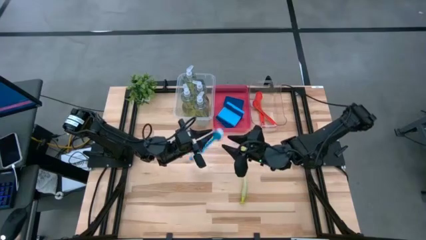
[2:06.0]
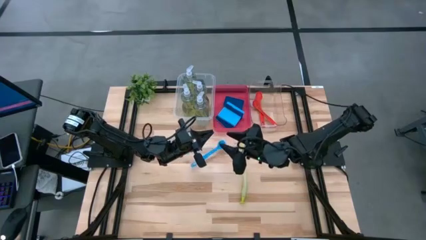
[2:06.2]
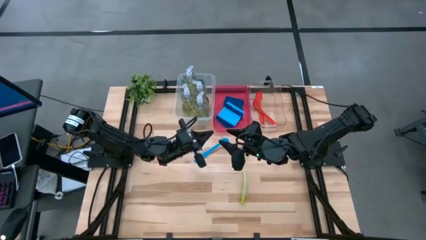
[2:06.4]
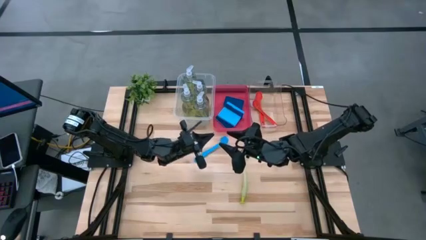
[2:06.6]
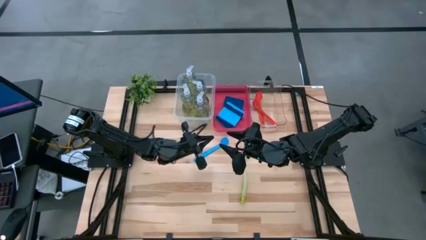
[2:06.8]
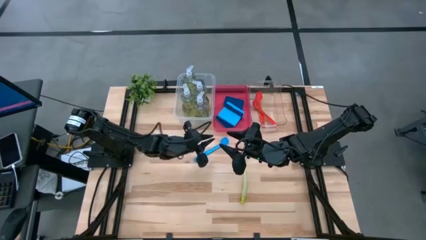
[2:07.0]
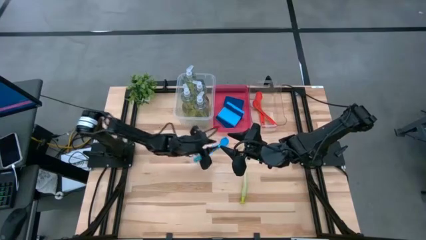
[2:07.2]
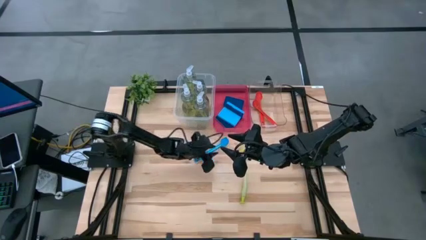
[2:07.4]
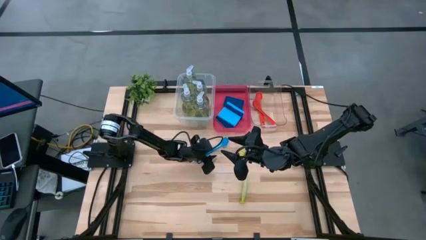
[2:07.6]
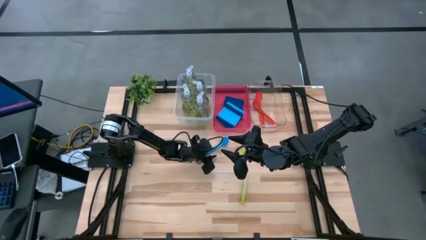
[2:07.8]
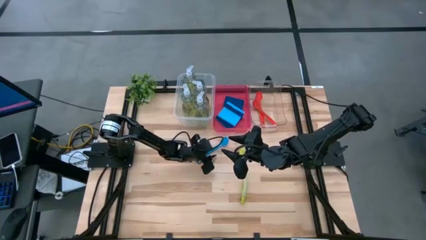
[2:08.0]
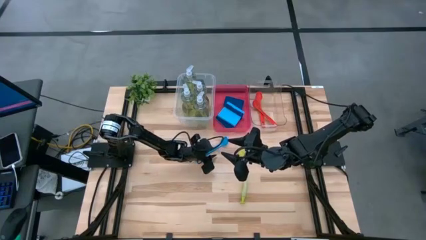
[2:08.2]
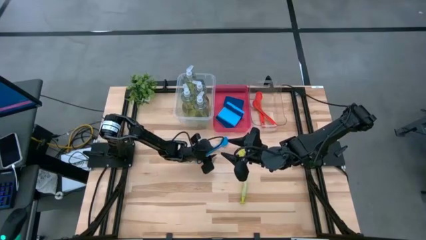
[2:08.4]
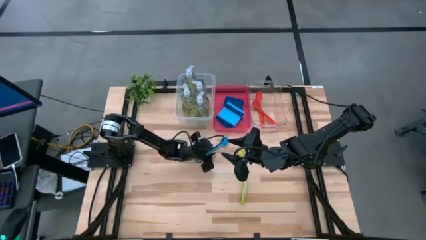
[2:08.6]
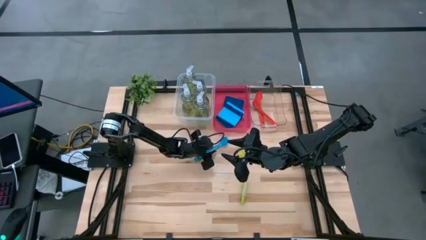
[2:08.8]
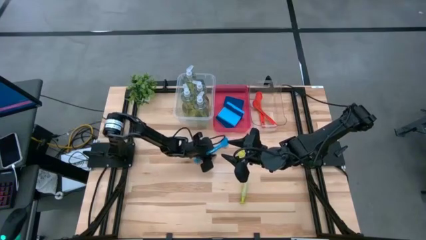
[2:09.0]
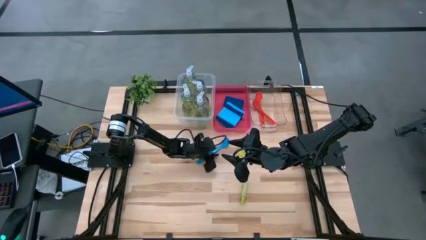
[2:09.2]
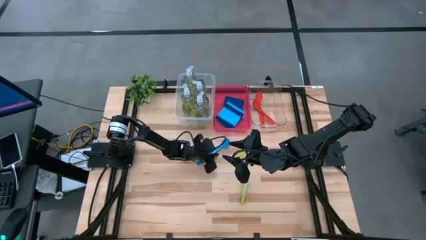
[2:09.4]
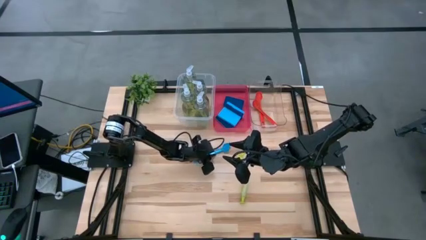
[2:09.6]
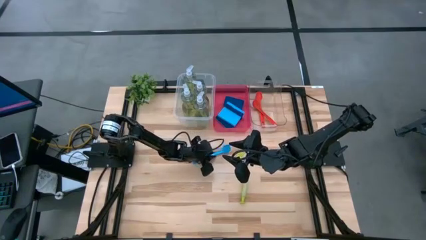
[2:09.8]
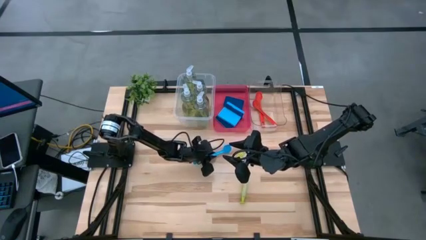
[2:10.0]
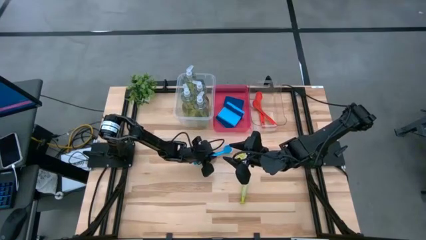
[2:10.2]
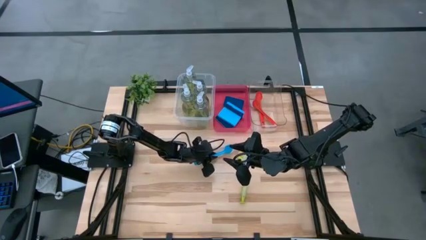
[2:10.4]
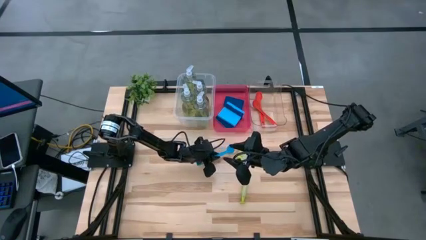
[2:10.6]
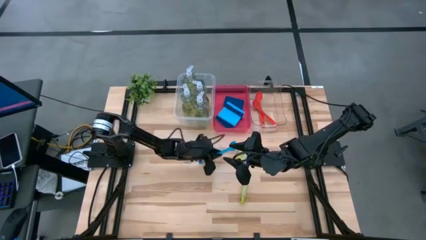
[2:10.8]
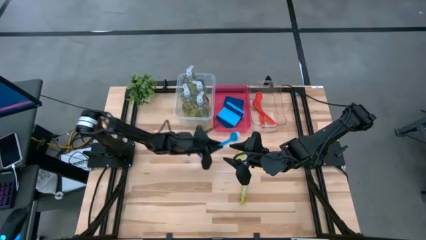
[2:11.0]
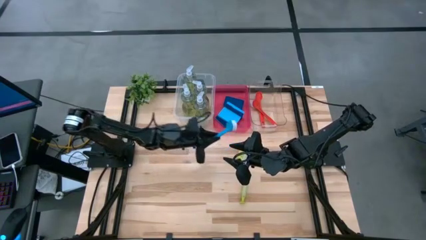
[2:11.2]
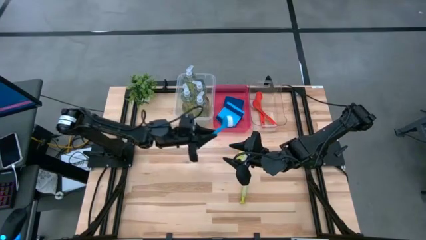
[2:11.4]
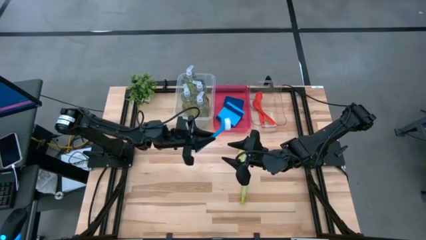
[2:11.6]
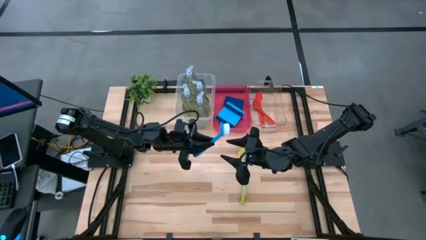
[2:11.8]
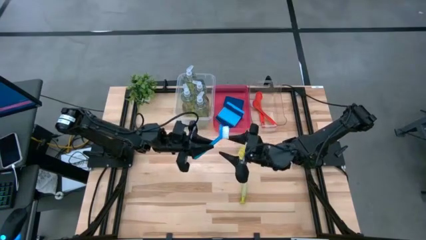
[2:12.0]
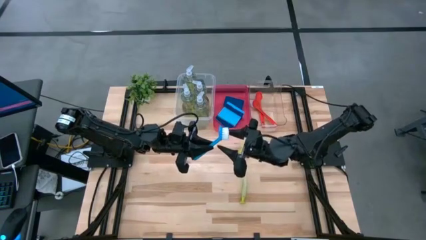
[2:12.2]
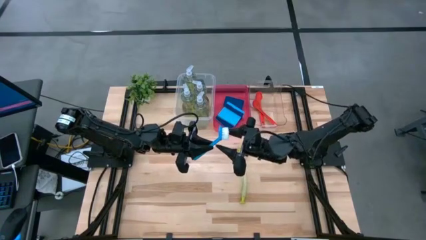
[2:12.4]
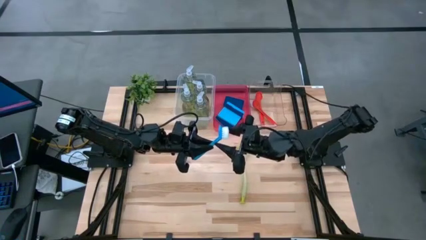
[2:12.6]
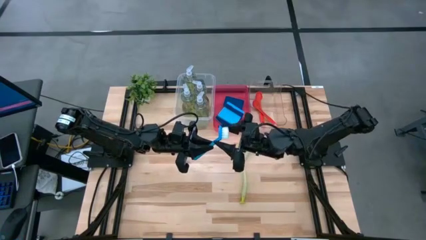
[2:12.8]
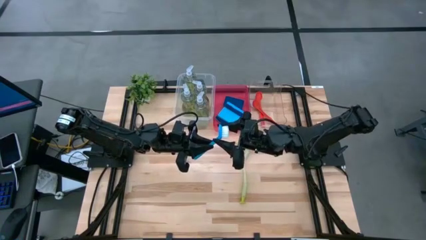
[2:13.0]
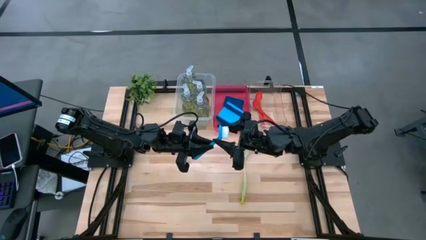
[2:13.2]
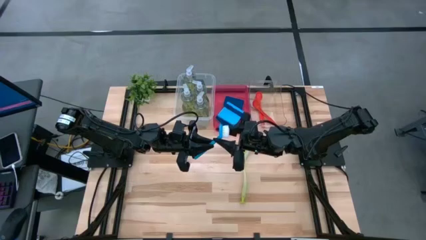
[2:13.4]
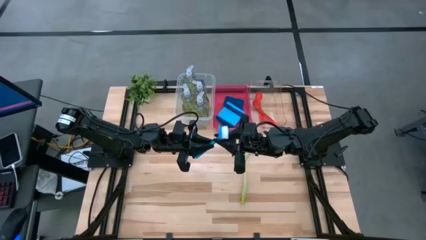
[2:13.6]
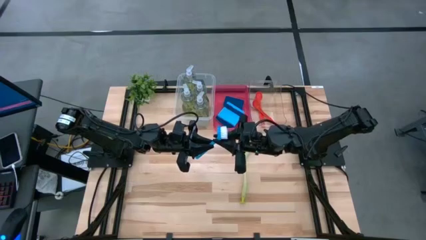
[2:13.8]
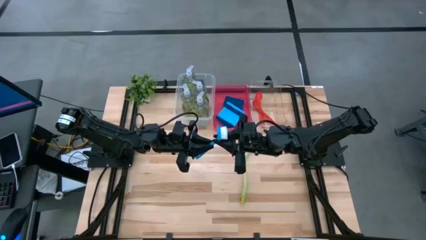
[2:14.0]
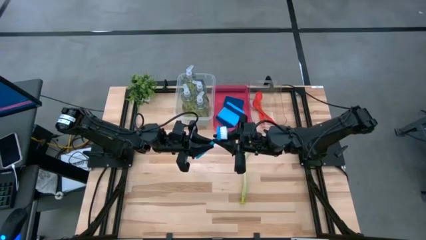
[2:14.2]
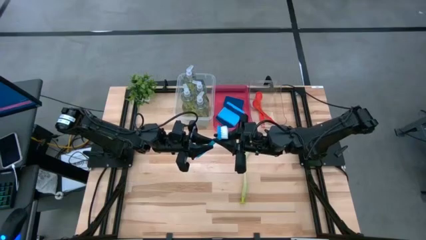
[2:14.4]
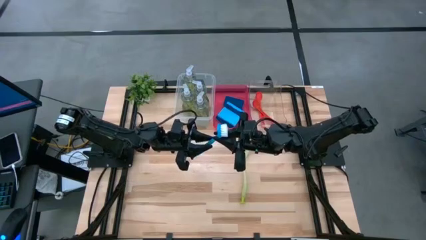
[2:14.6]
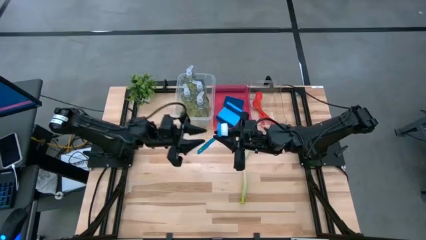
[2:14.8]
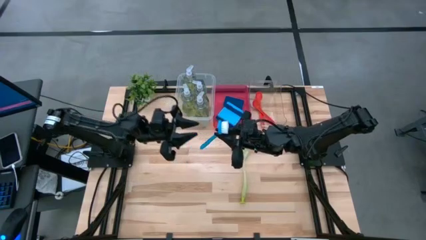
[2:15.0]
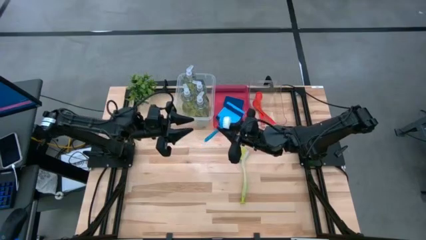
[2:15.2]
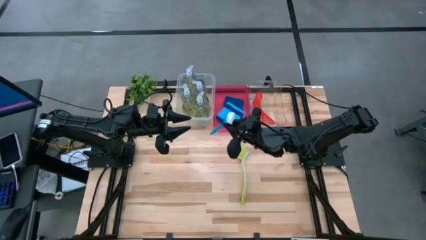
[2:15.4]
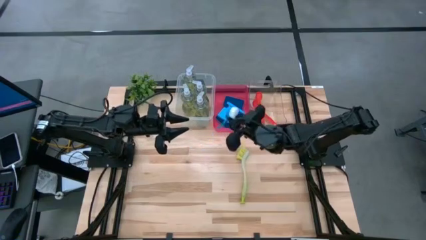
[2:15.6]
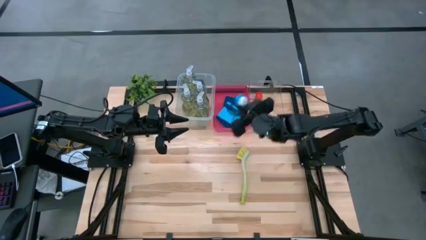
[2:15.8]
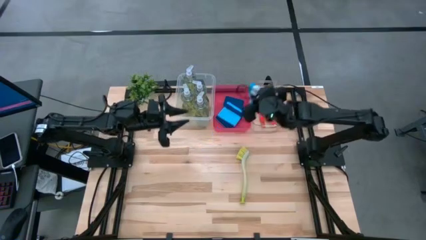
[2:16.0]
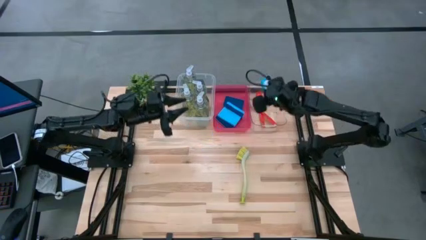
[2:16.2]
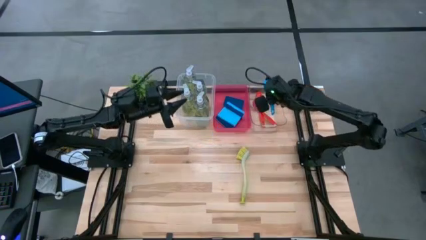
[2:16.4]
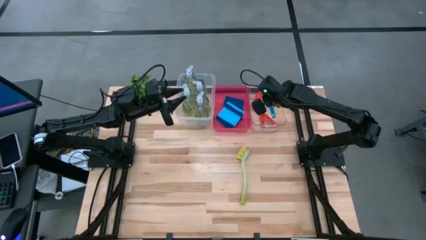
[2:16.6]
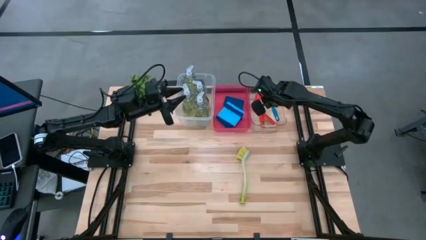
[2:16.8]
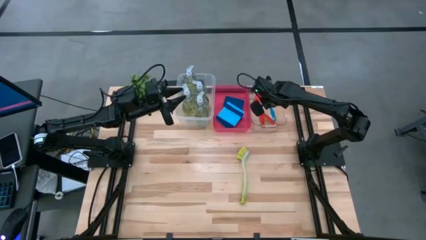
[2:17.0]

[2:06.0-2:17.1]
Task: Pick & Place Kitchen Sink Supplies
Put the blue dish brush into the transparent bin

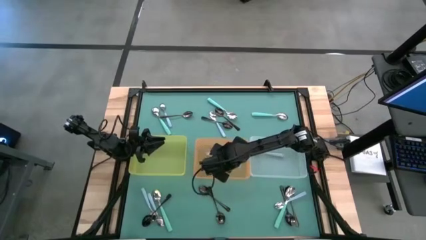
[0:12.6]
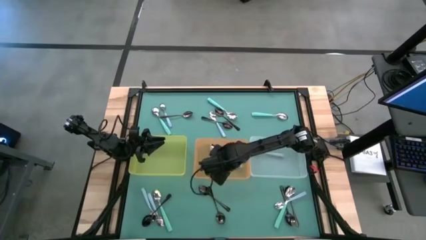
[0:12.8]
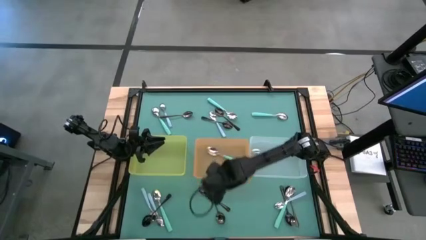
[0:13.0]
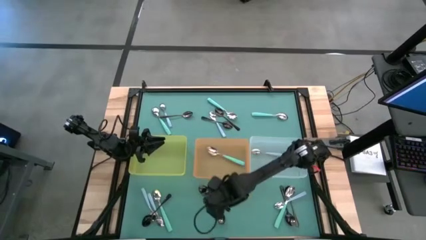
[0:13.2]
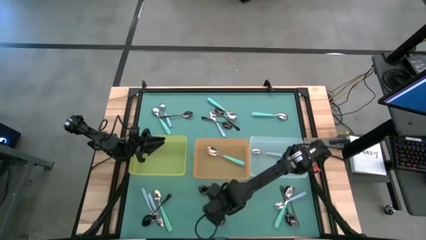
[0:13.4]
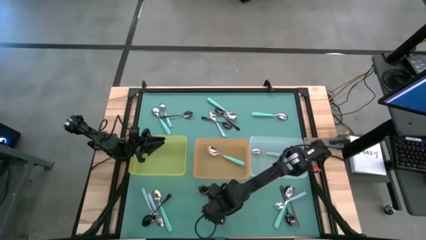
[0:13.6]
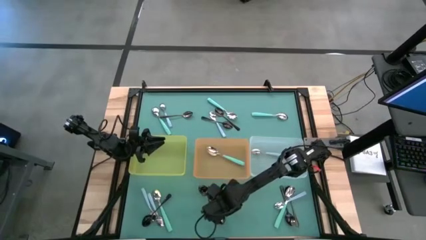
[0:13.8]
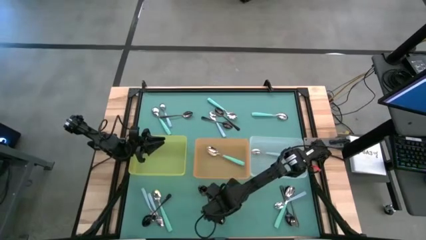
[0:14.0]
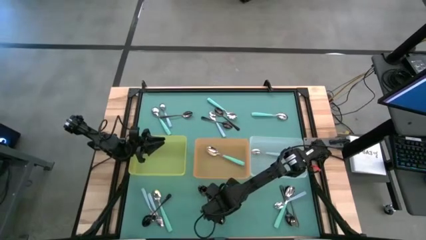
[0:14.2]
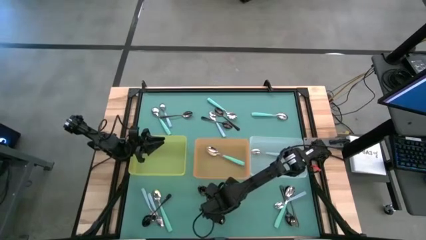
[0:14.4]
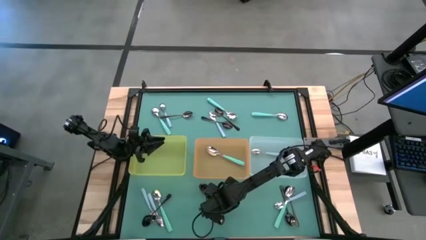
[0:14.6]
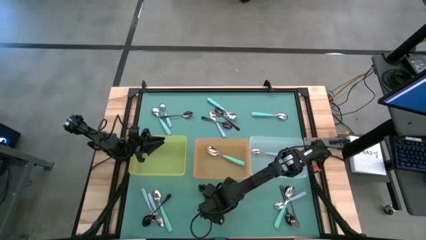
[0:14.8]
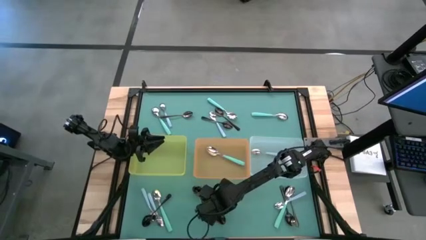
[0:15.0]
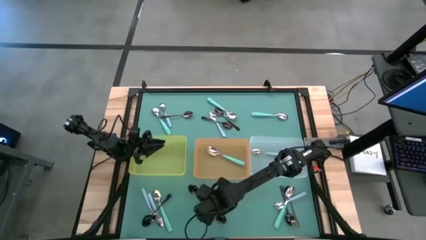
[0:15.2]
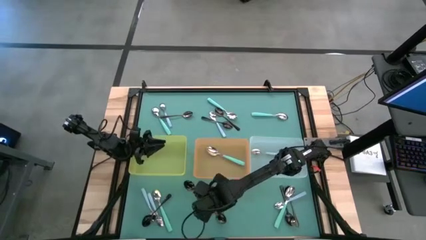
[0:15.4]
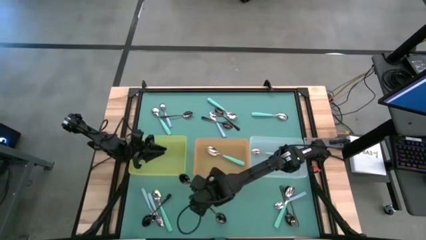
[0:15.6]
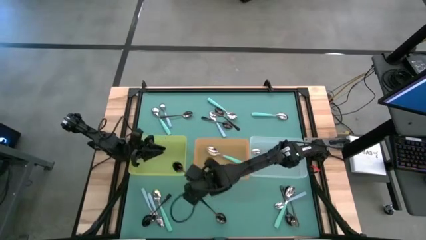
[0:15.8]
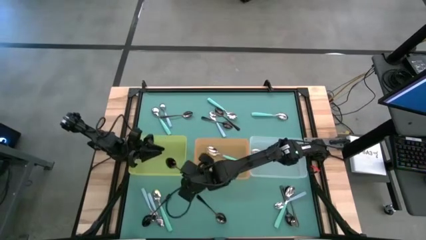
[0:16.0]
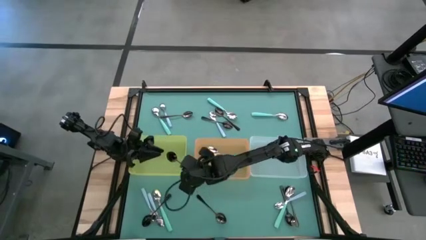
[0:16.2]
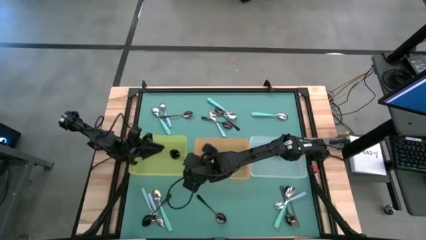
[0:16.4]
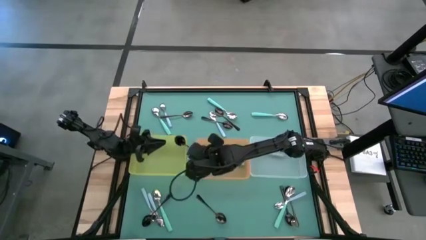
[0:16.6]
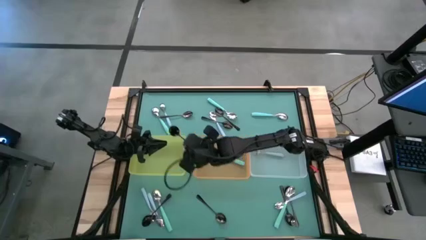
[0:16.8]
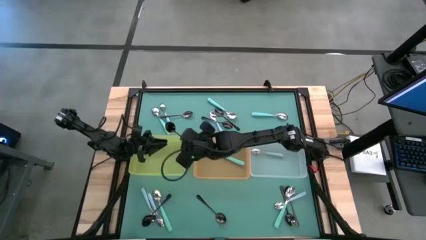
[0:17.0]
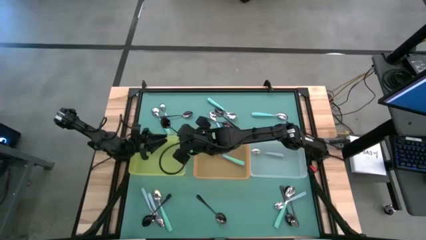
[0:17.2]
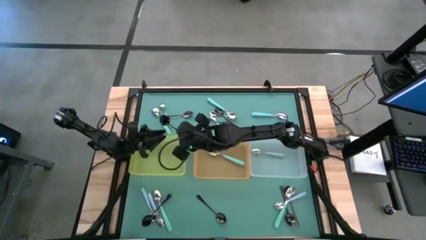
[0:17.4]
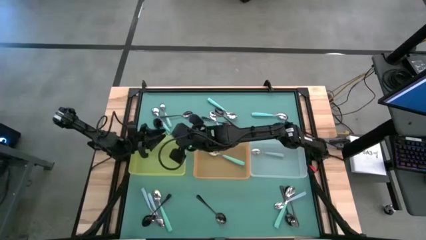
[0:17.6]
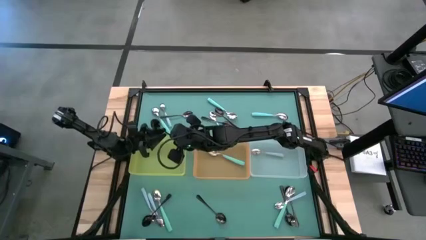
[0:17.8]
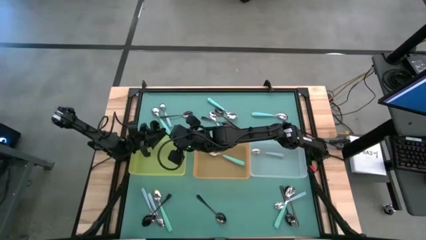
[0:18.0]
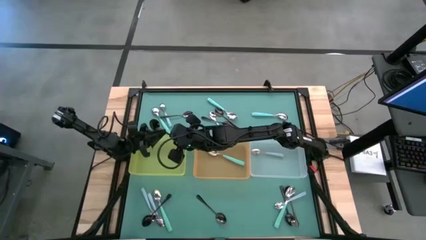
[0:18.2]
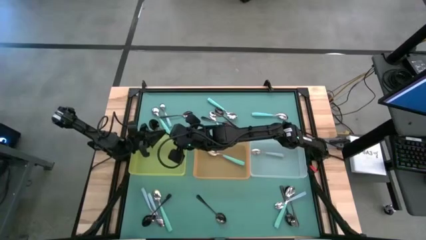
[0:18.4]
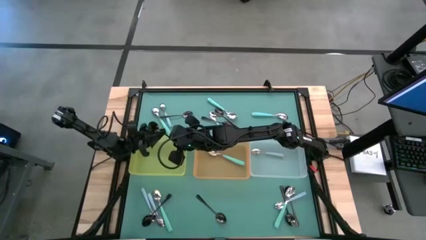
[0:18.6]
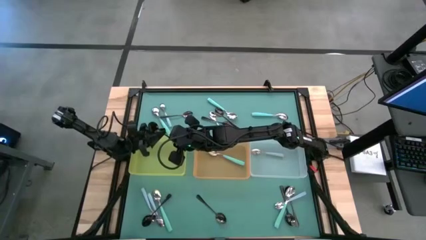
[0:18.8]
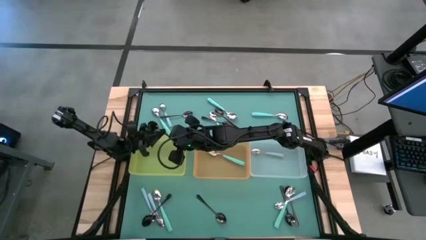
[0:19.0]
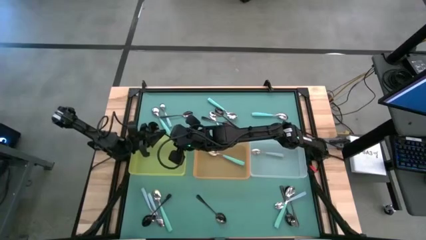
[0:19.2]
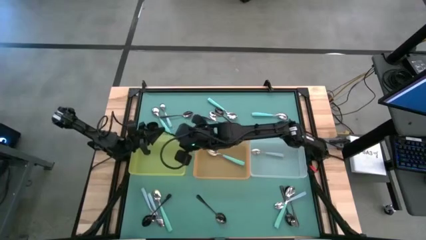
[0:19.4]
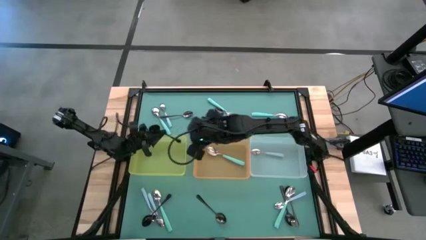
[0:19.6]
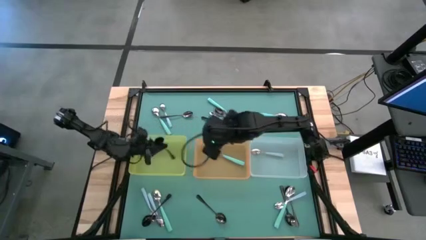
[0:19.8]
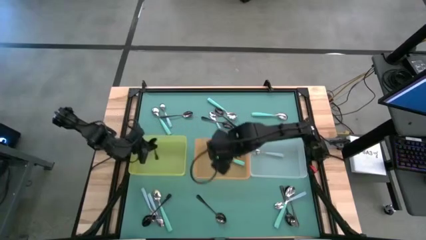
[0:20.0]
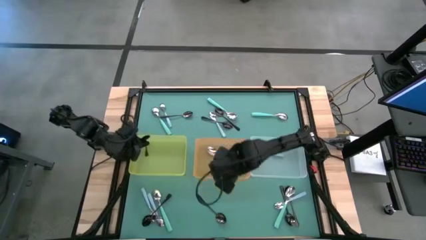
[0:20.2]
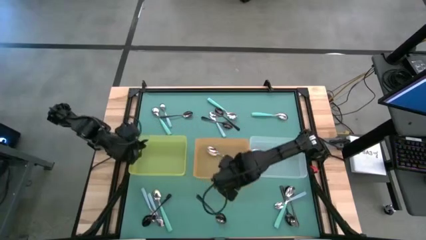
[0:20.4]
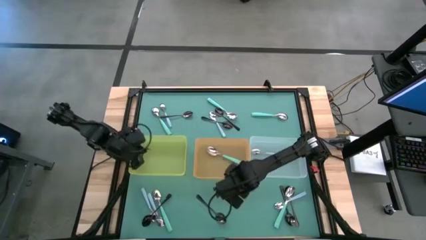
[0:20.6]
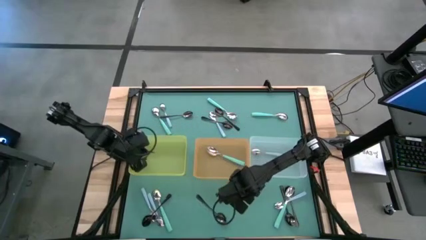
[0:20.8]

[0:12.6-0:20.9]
Task: Sort silverware by color (type)
Put the black spoon into the yellow bin
